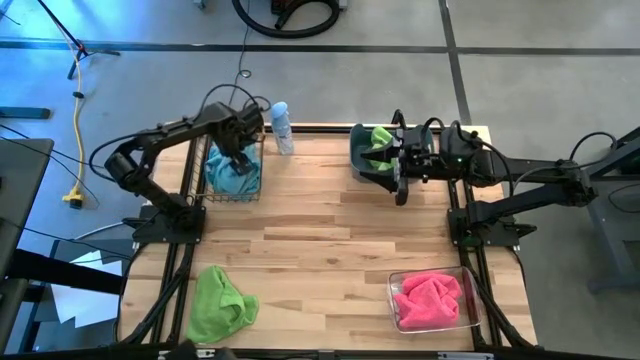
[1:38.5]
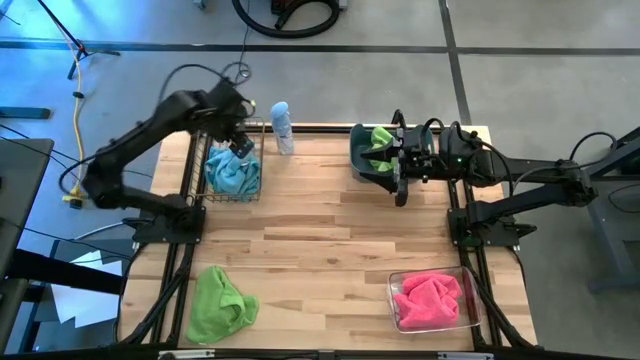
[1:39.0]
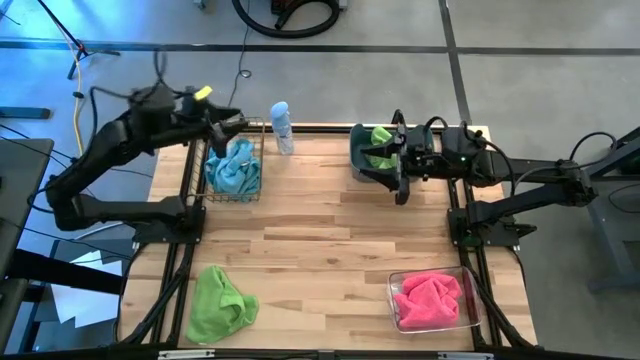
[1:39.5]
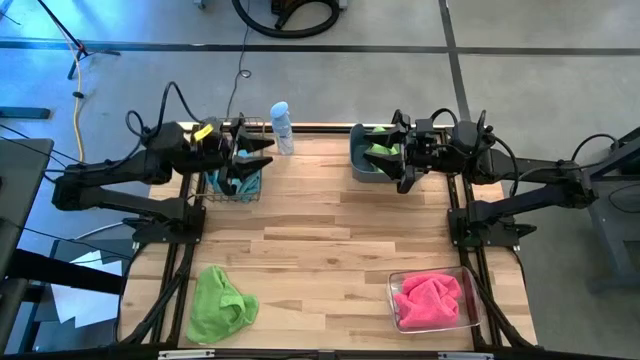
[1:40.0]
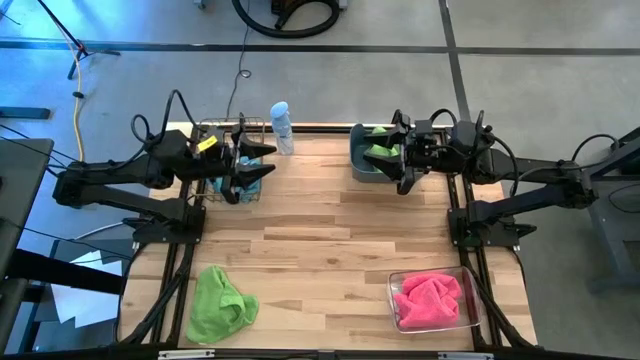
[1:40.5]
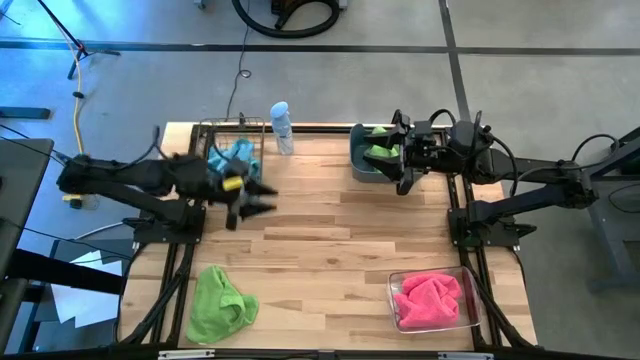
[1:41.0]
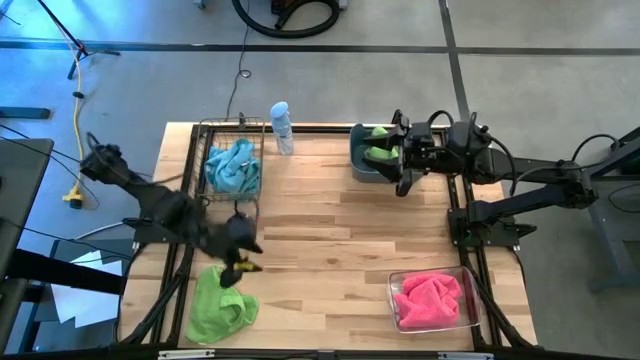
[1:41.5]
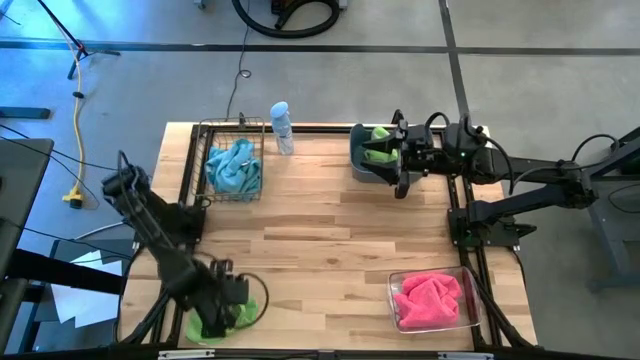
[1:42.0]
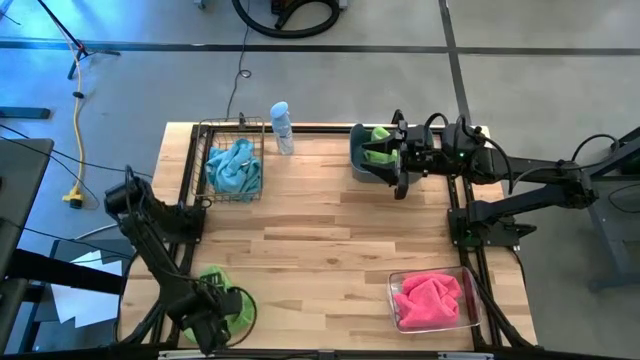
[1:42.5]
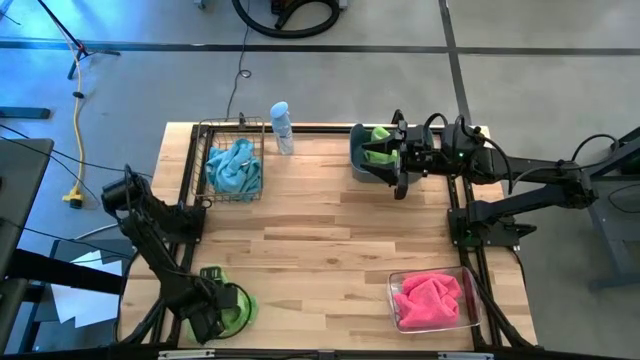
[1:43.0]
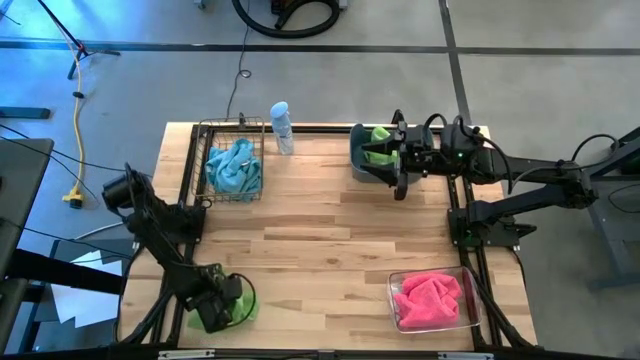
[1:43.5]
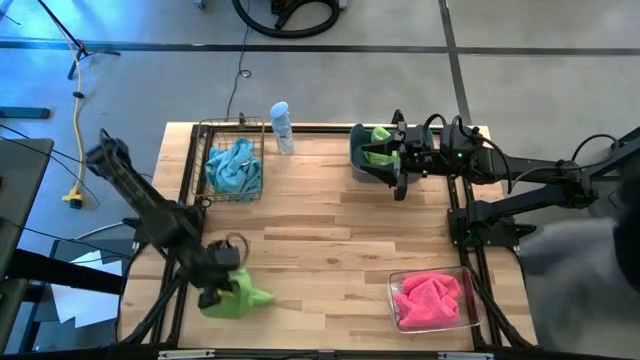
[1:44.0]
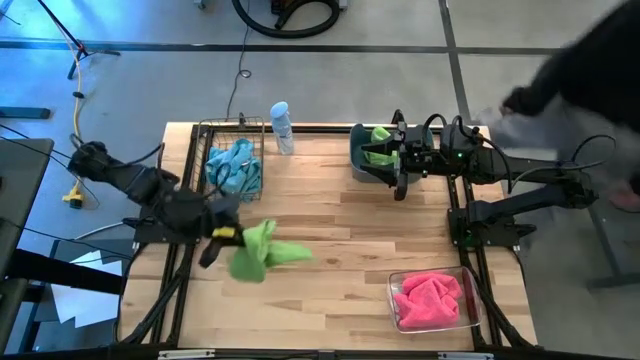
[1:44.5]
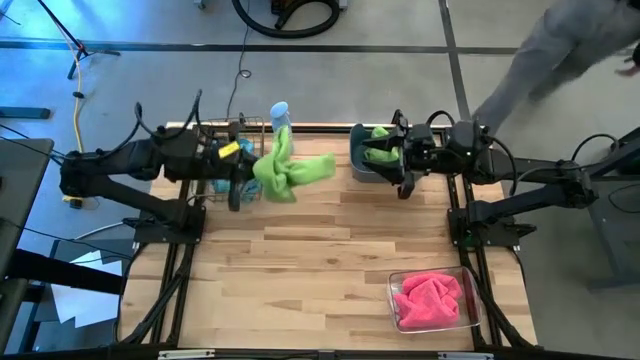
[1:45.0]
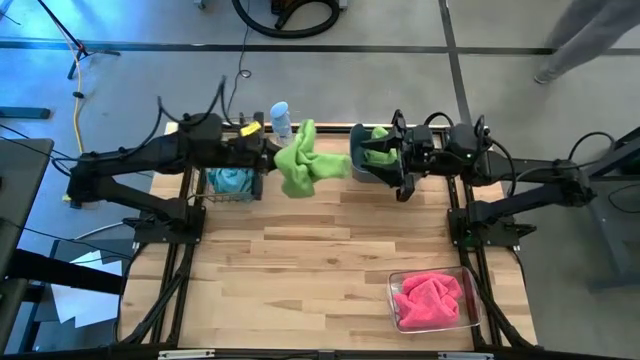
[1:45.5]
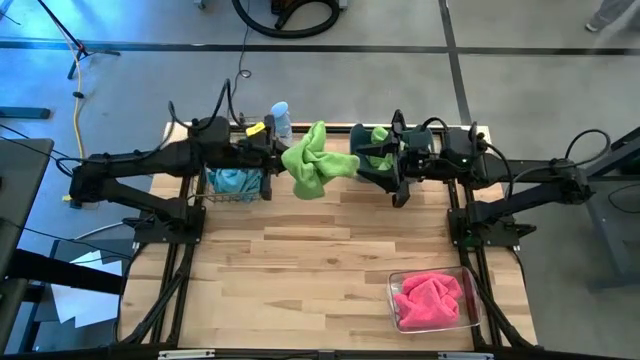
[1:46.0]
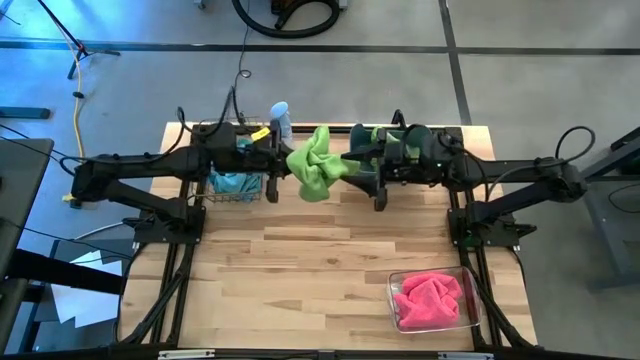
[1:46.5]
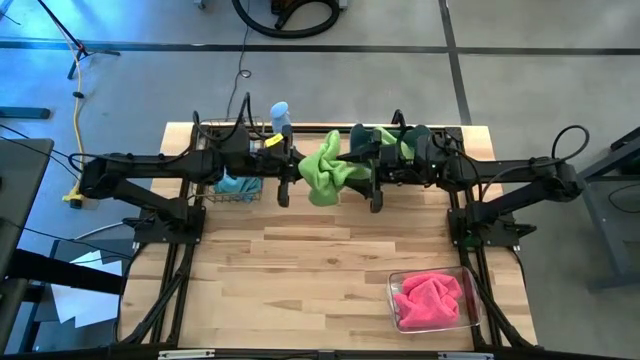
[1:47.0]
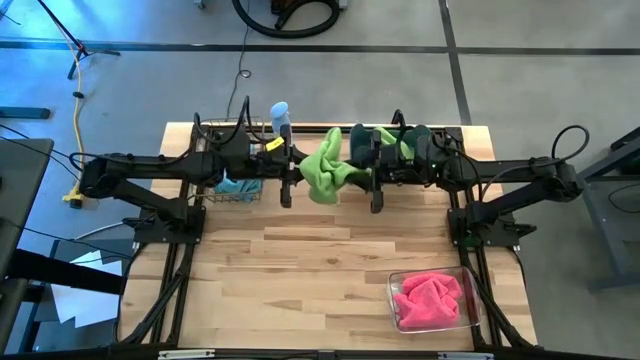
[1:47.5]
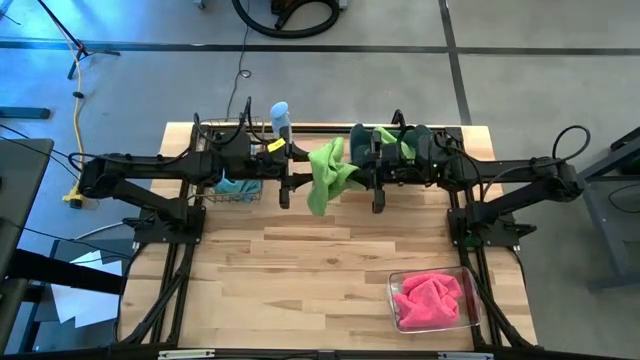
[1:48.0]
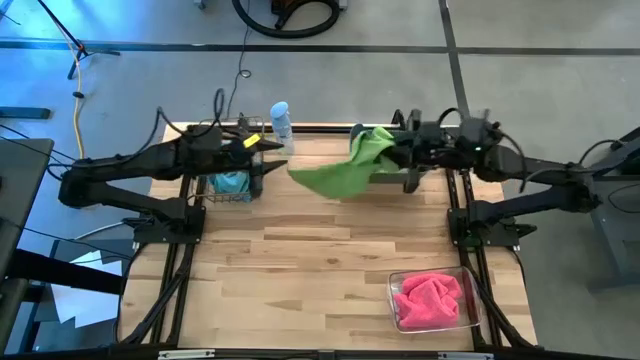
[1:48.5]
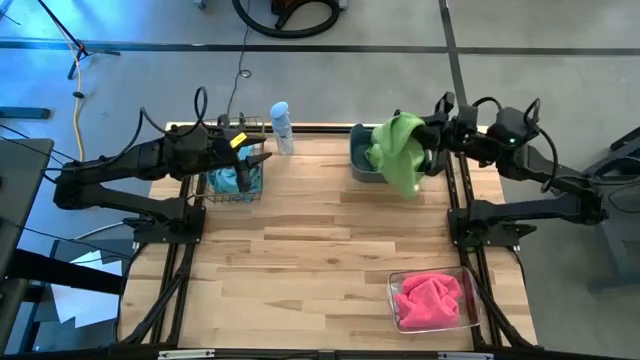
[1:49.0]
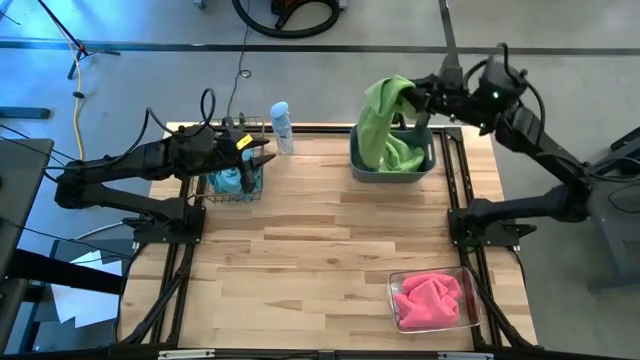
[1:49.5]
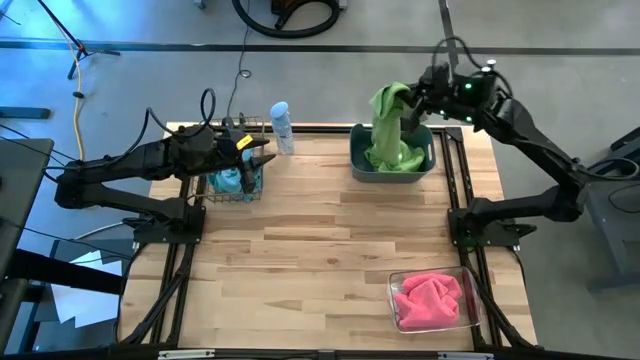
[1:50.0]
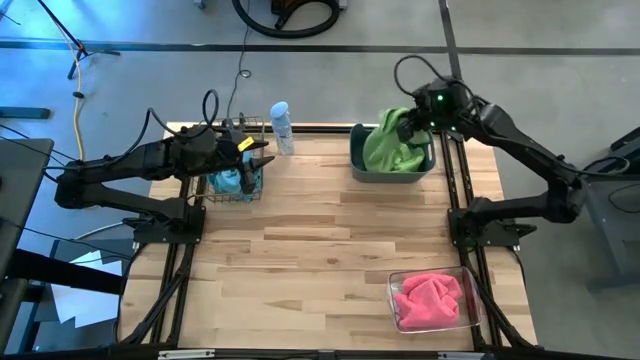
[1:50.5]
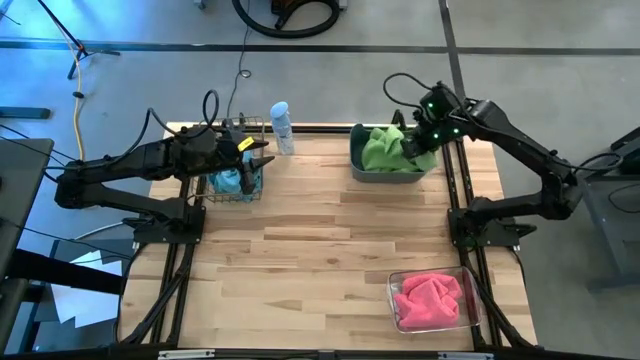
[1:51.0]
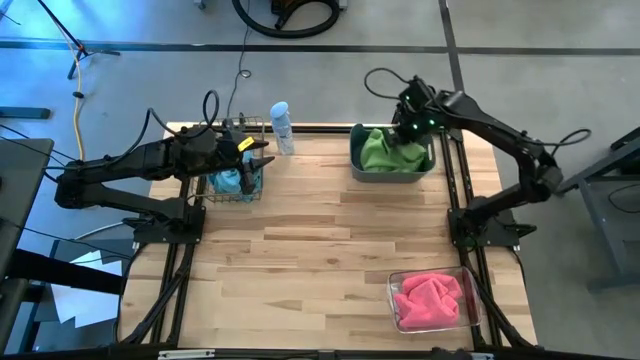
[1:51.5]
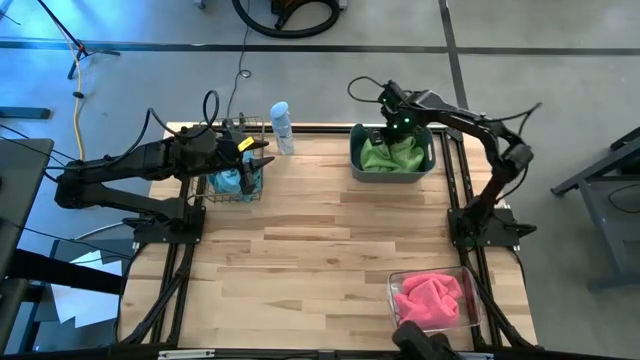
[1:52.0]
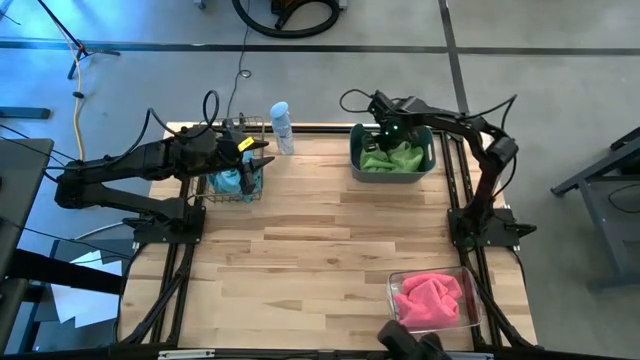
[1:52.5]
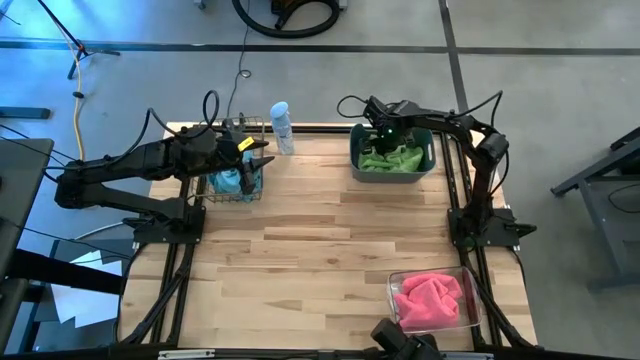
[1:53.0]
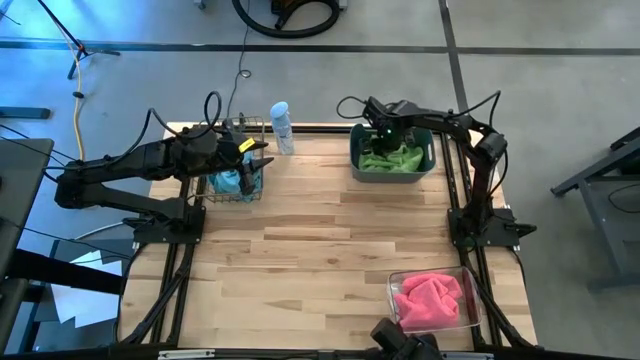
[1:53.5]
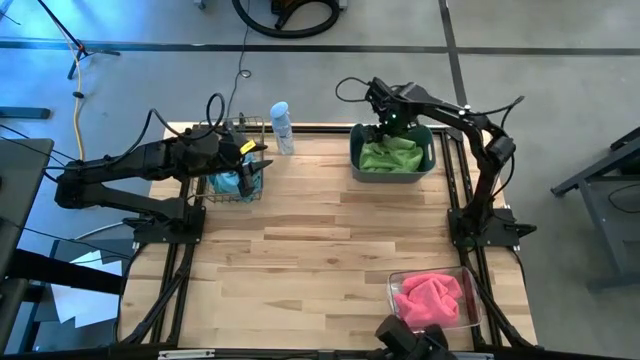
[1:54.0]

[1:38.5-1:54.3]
Task: Sort microfiber towel by color & place in baskets
Put the green towel into the blue bin

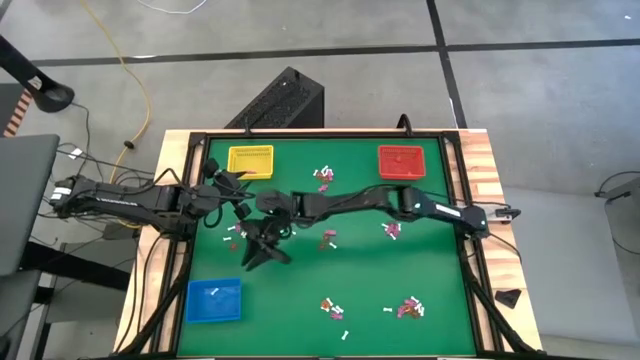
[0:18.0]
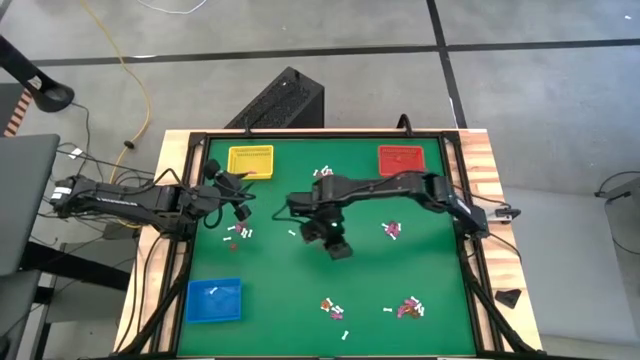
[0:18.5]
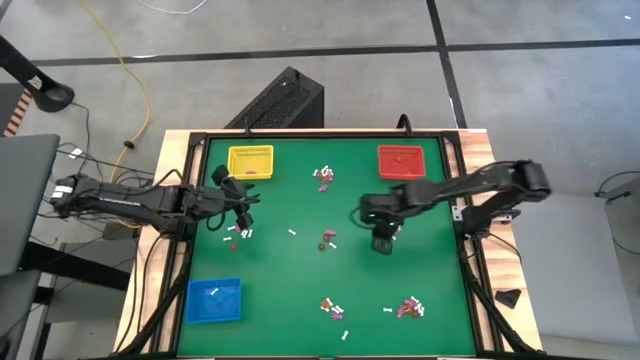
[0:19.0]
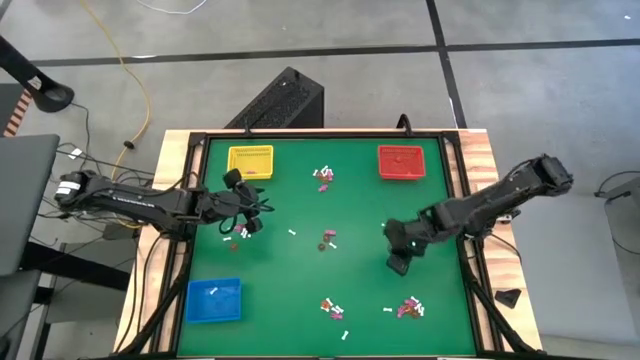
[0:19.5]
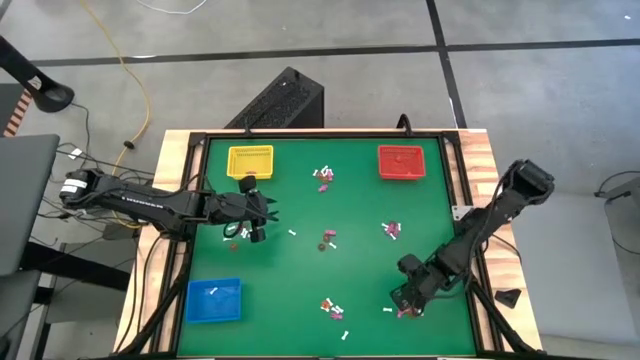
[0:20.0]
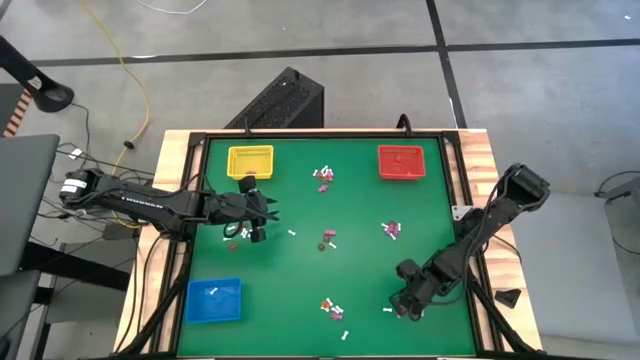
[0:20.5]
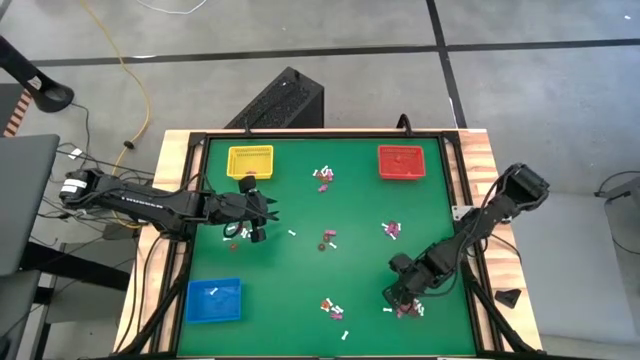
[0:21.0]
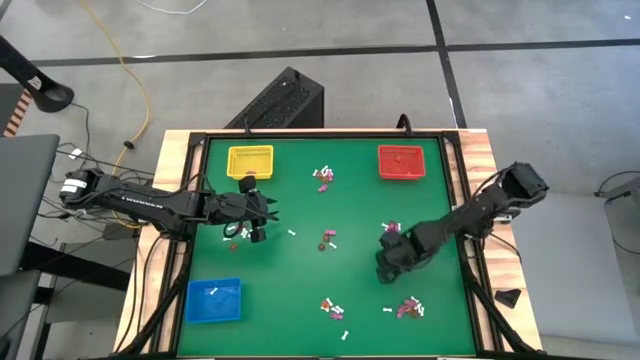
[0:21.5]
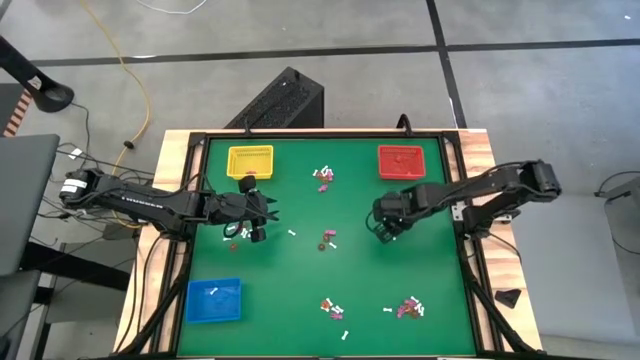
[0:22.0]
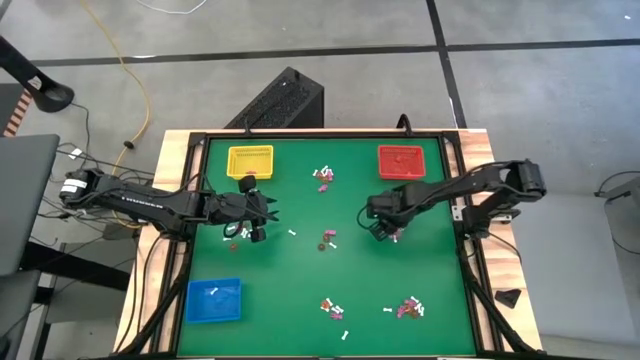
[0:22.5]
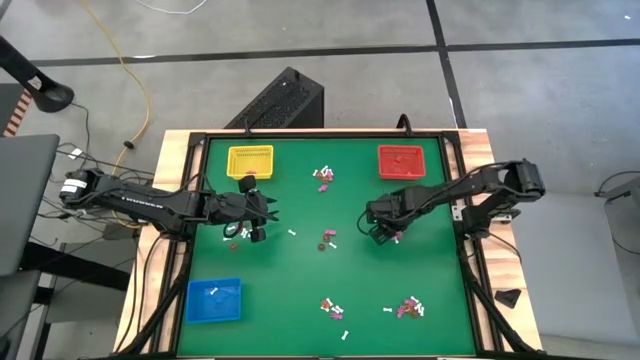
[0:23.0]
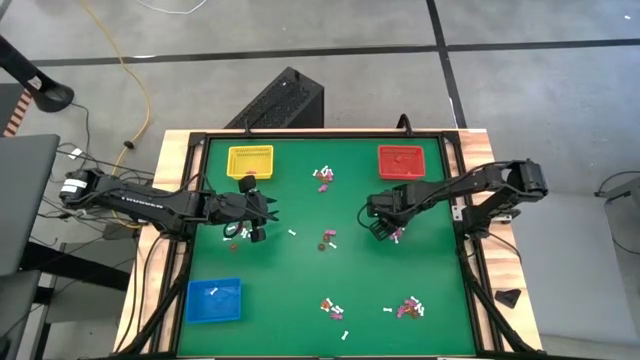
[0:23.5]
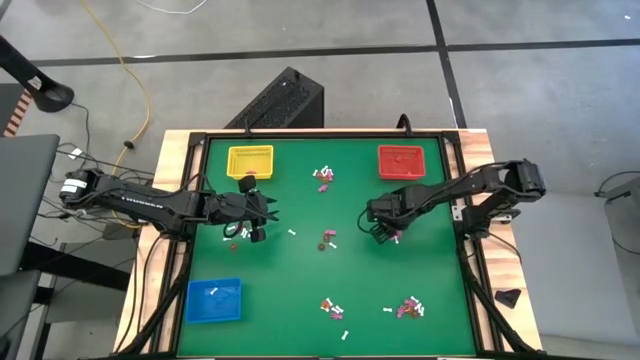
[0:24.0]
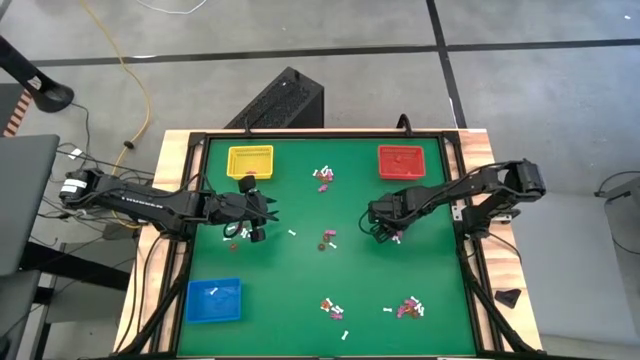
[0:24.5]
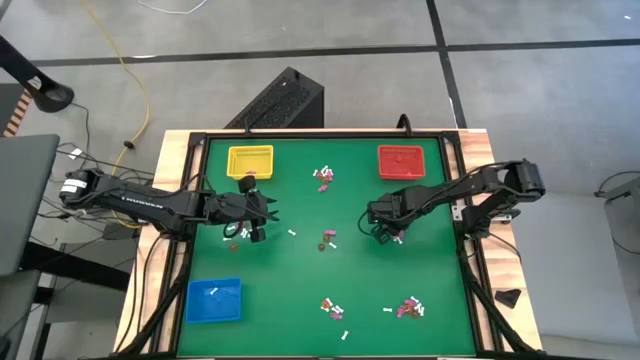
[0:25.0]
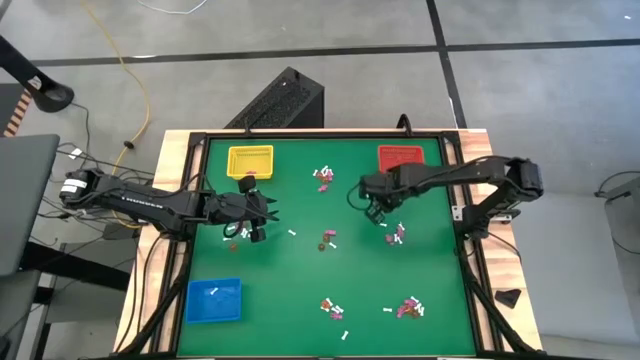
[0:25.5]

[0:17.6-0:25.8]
Task: Sort Halloween decoration
Put the pumpkin toy into the orange bin
